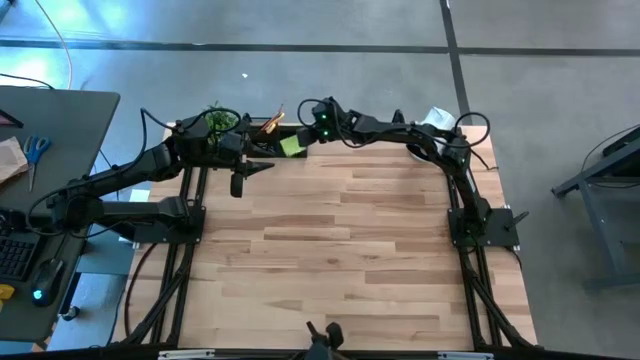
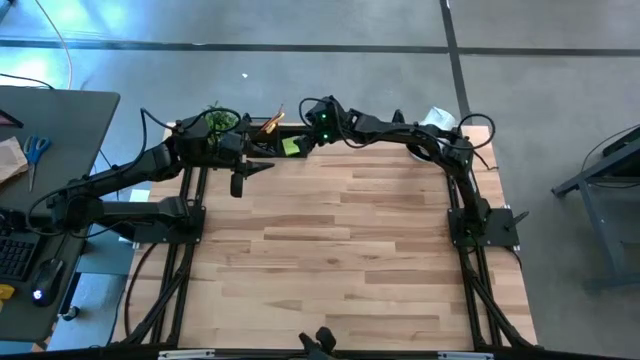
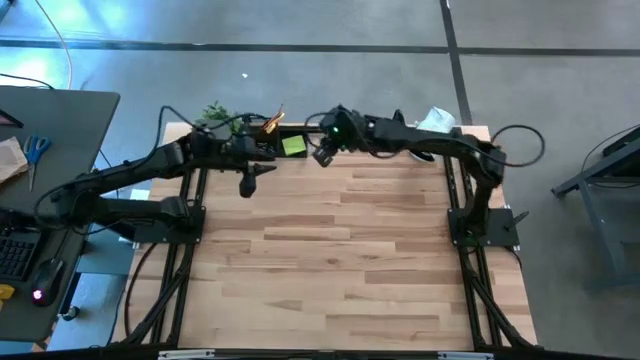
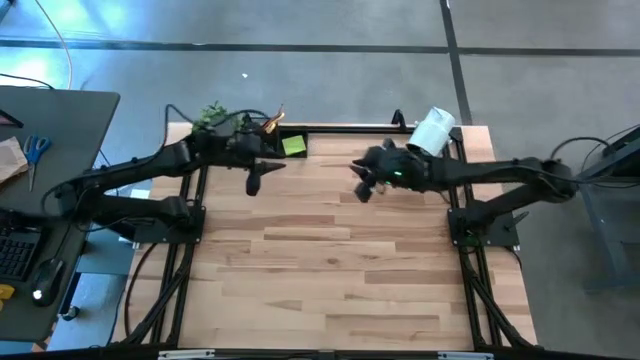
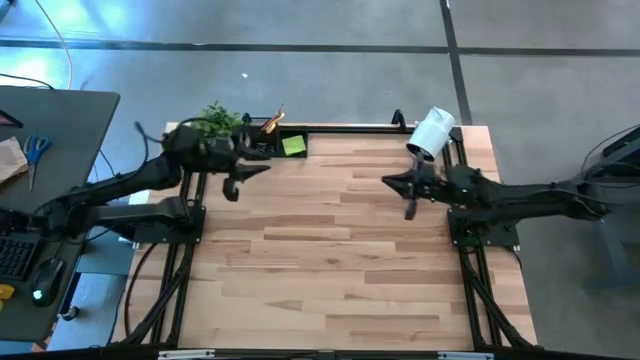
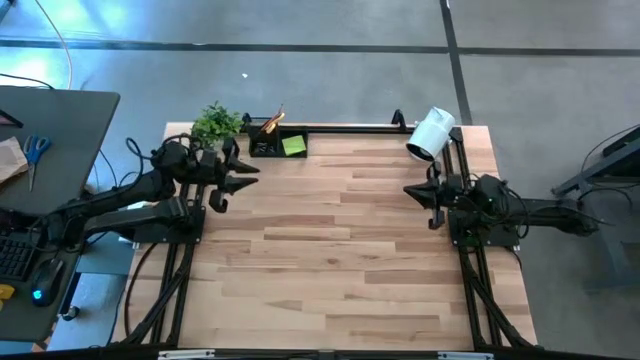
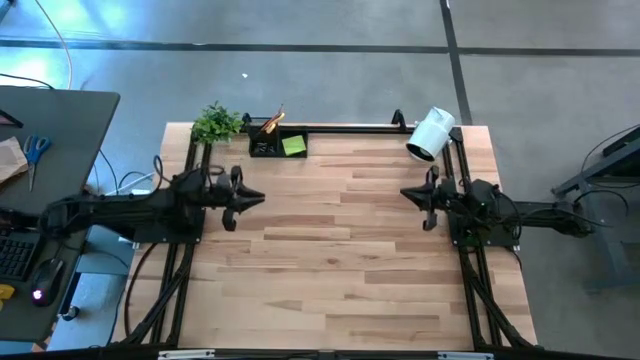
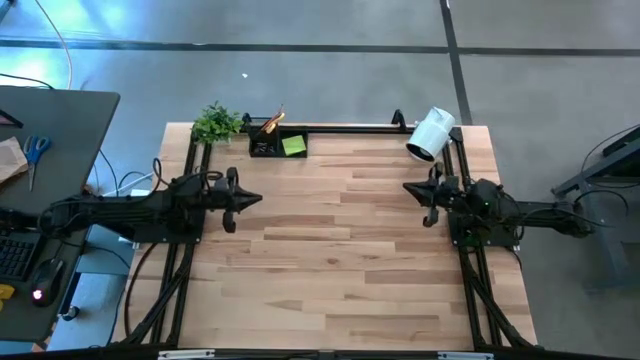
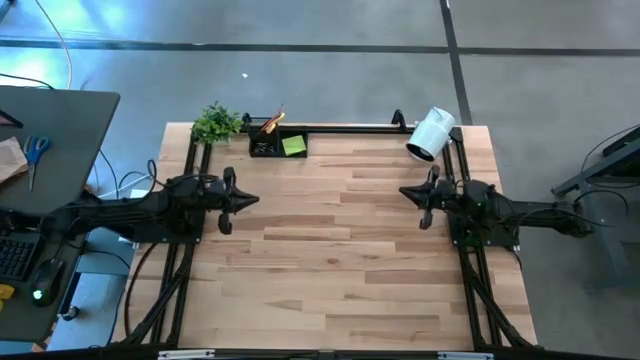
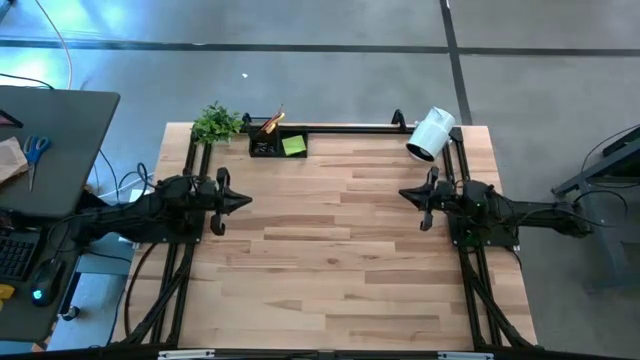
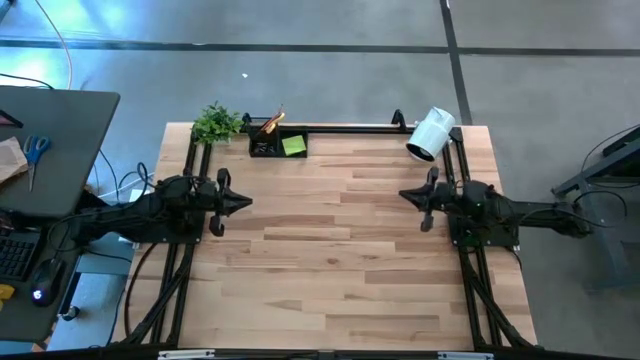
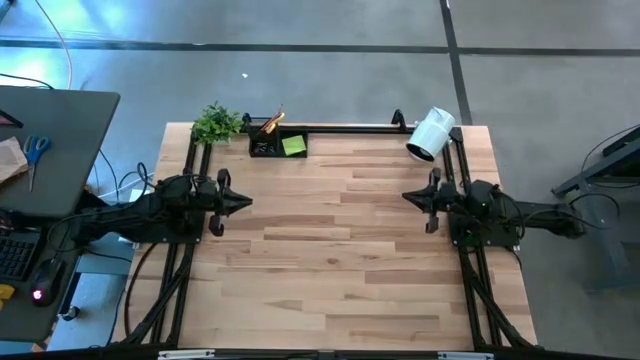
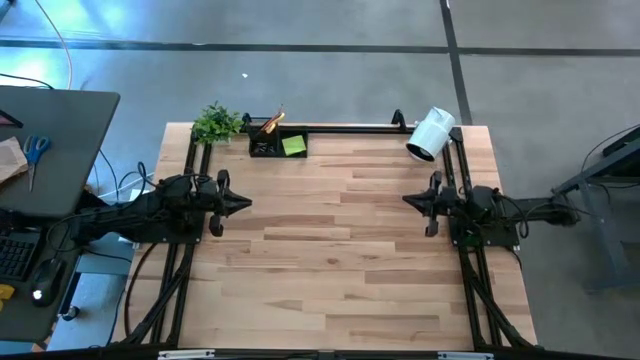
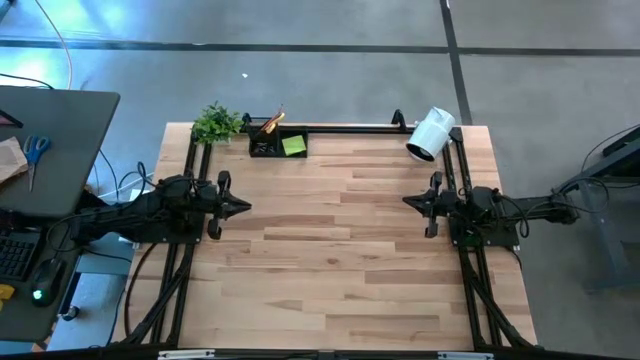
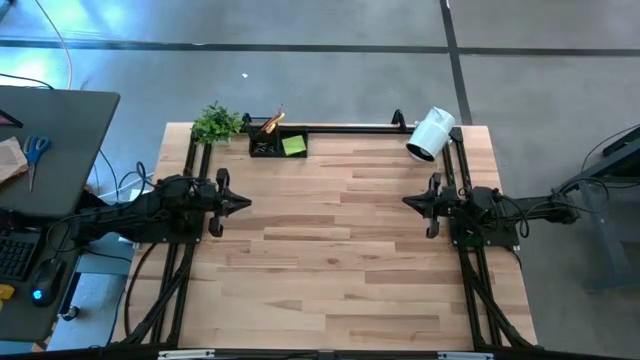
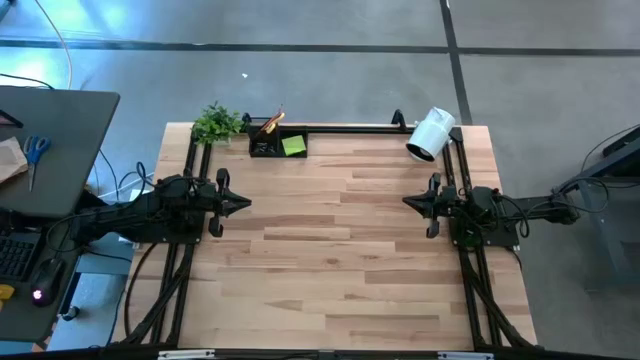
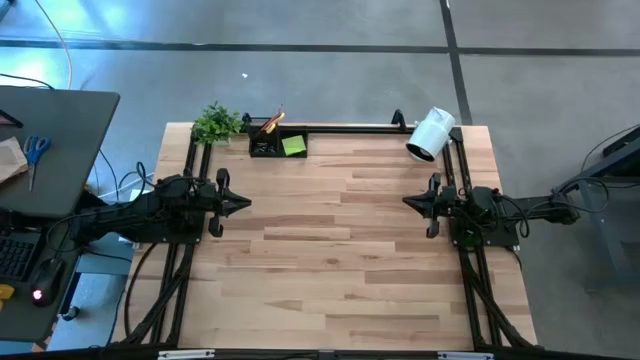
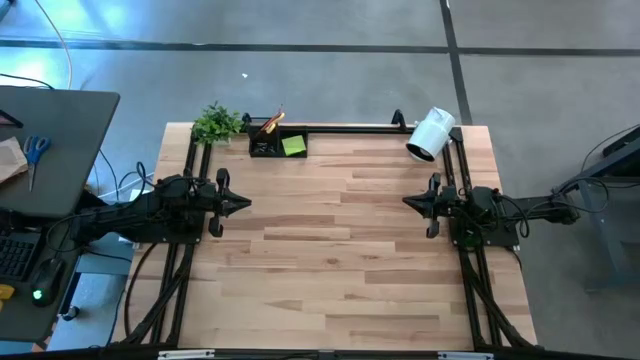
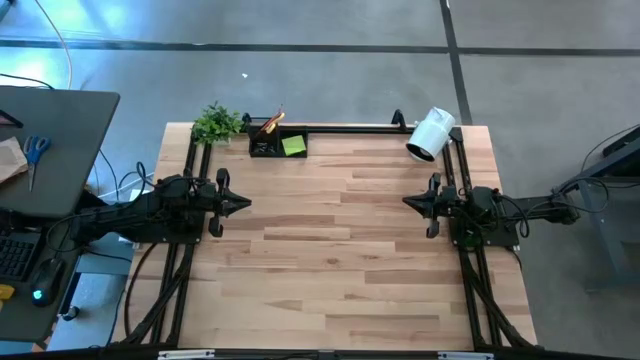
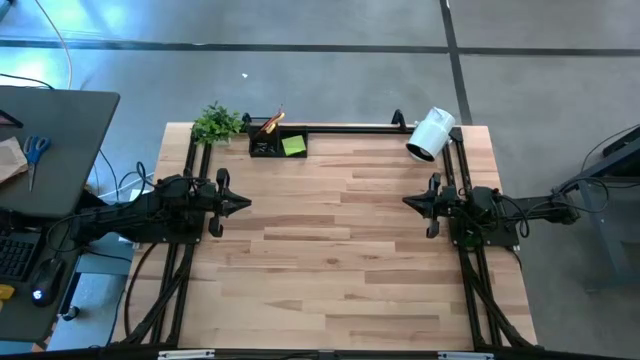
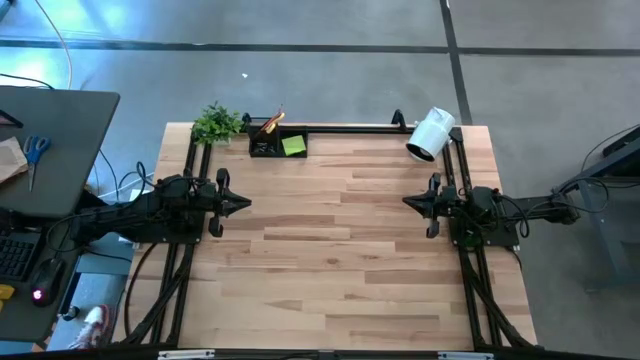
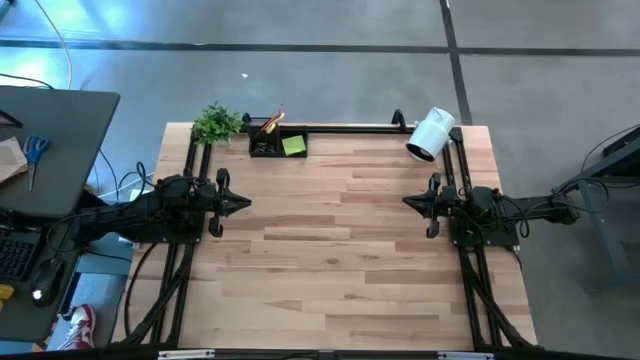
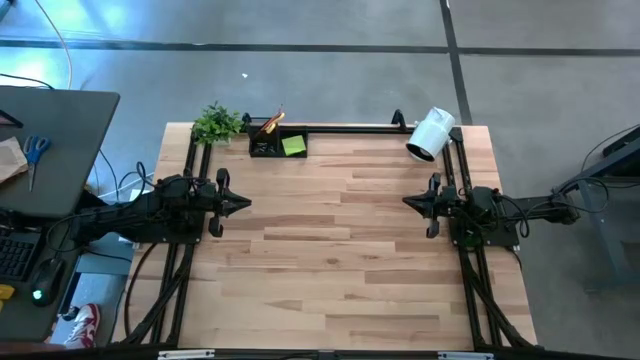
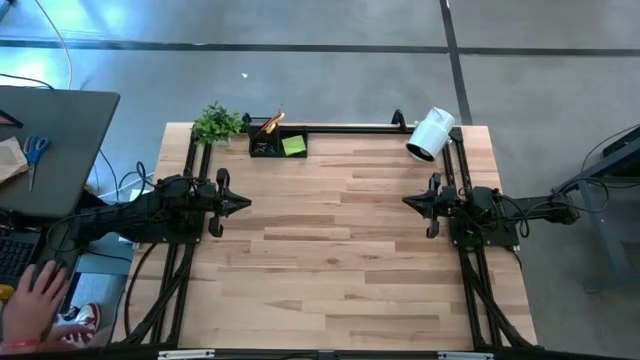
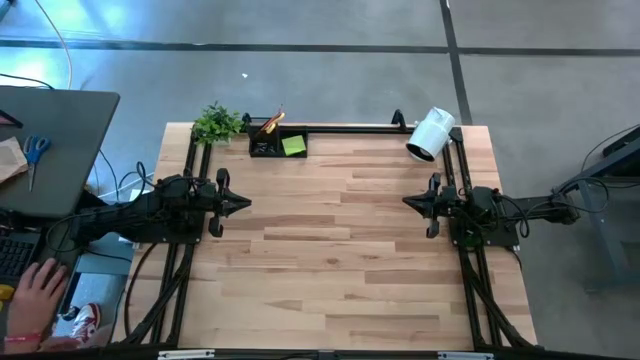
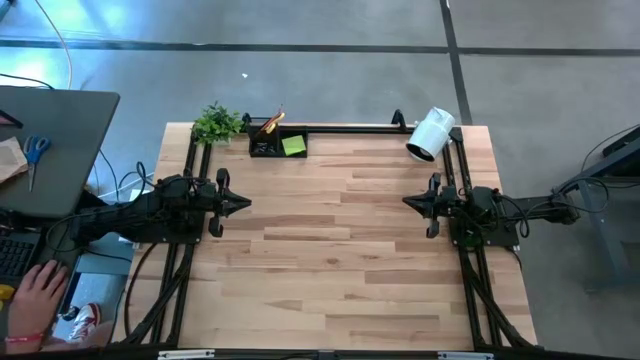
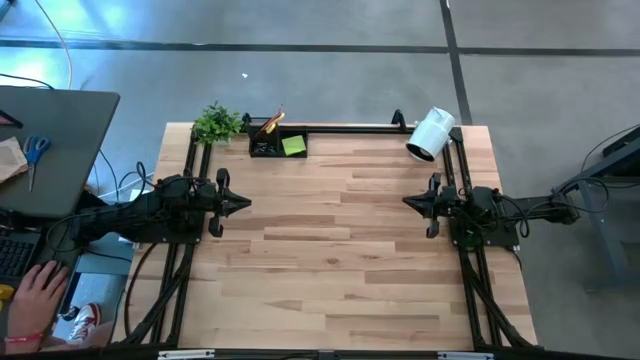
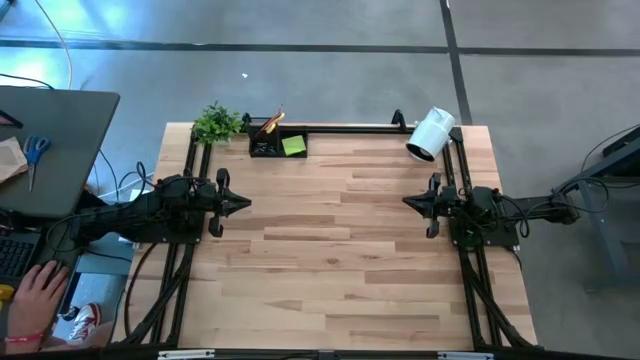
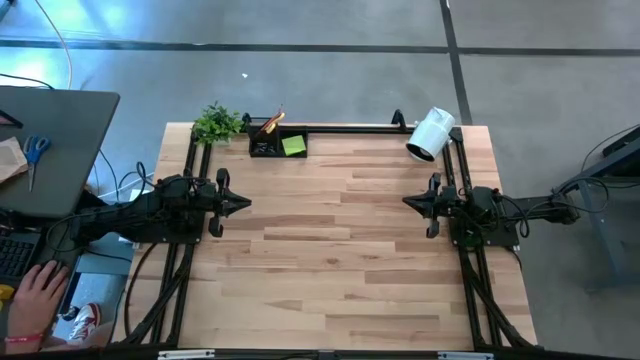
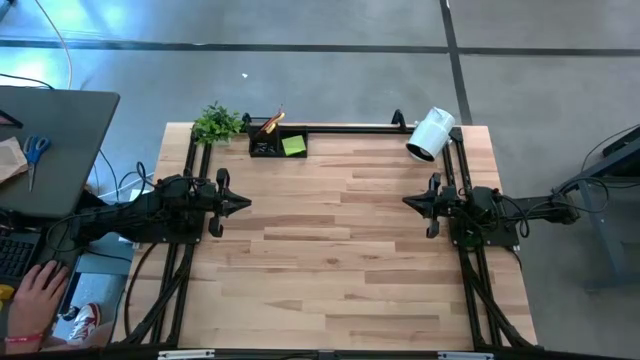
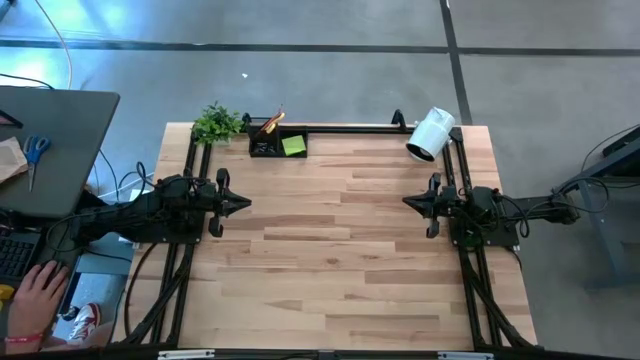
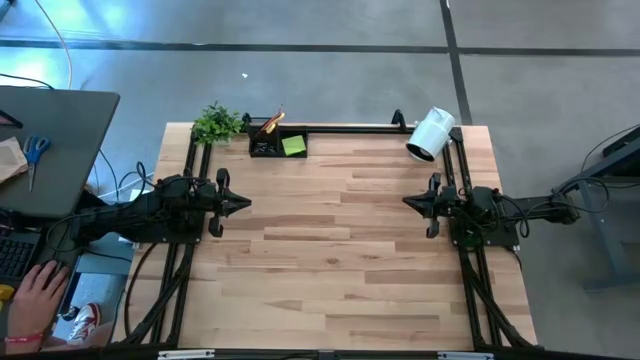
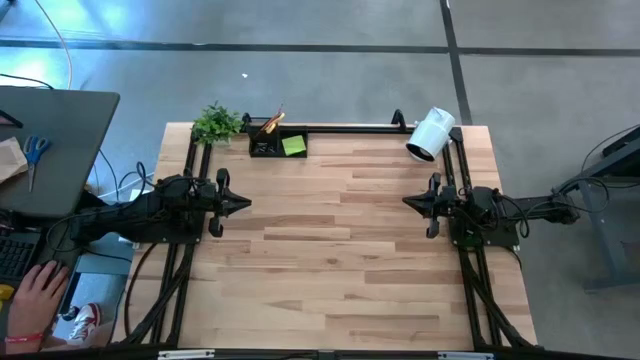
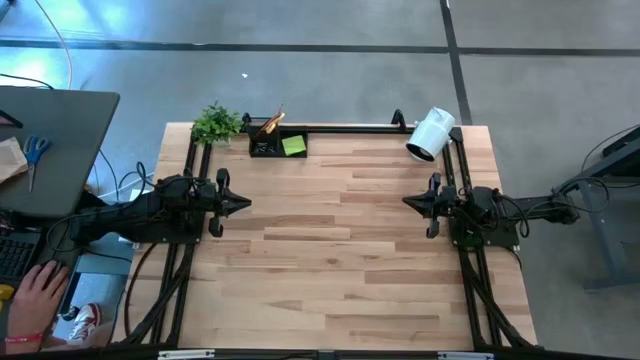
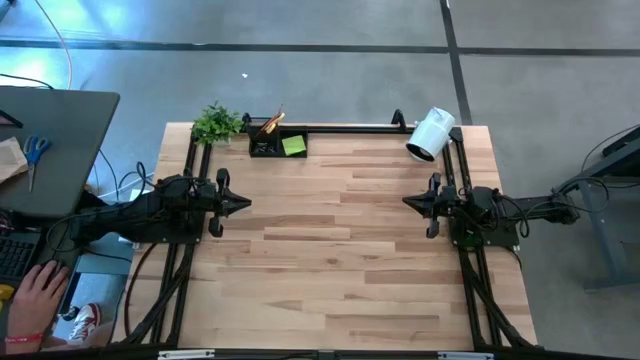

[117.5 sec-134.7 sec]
Task: Pick and place office supplies into organizer
Return to Home Position

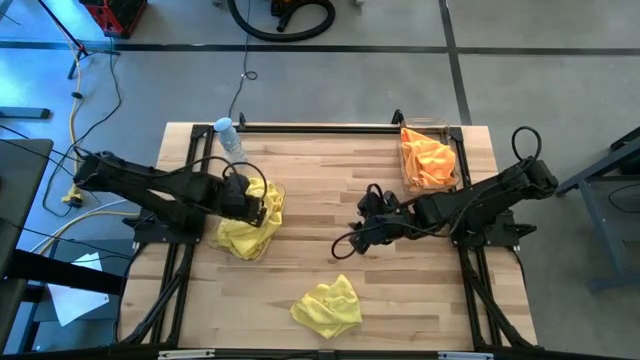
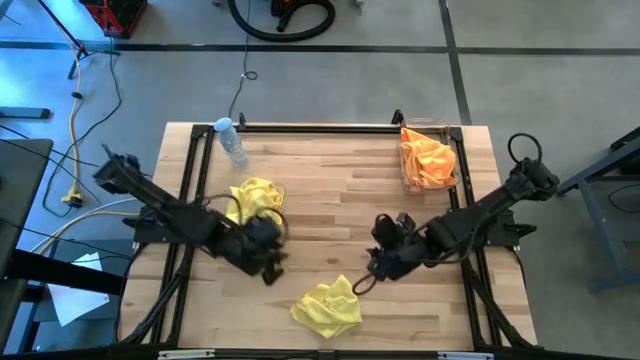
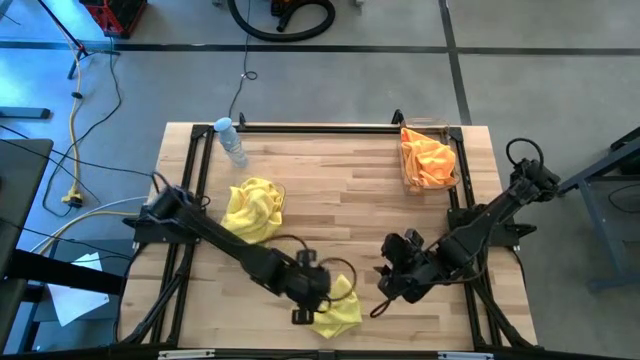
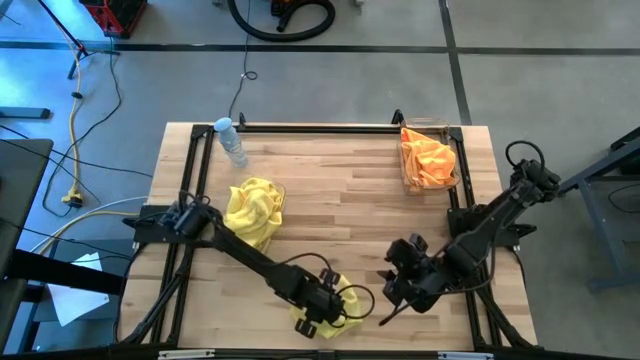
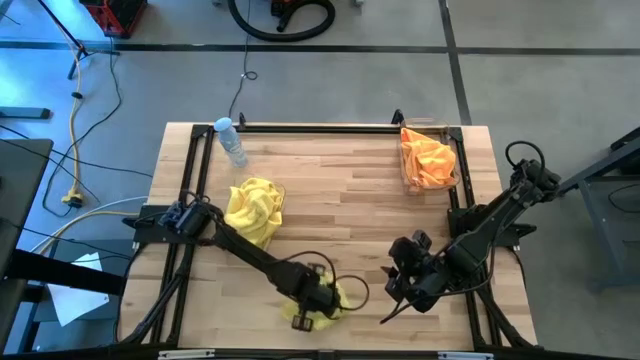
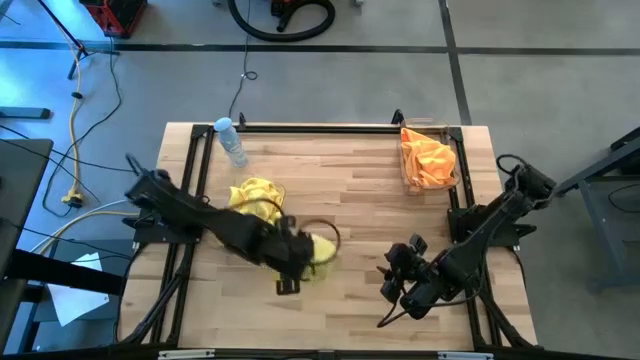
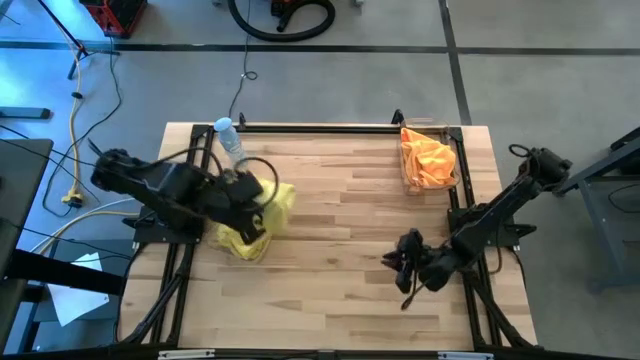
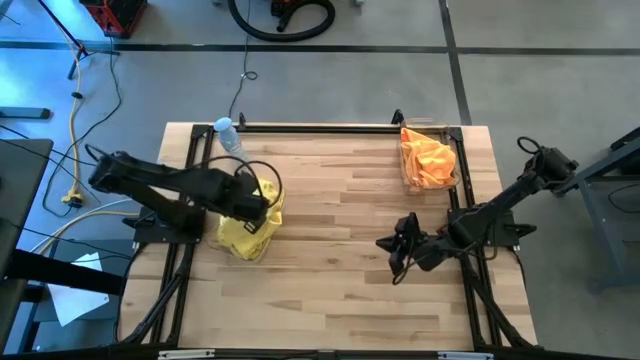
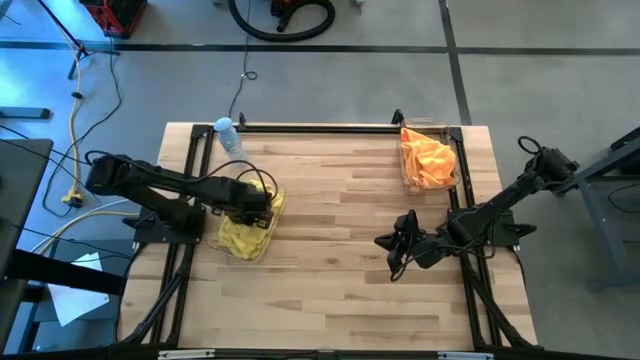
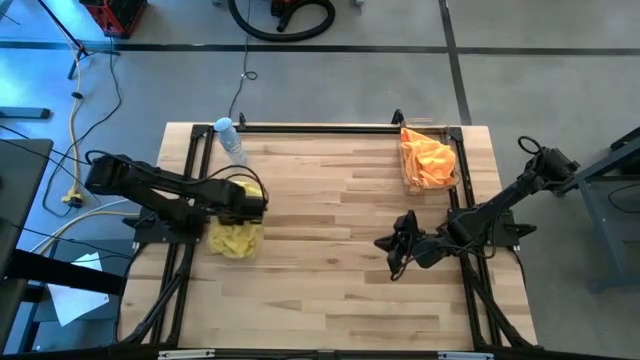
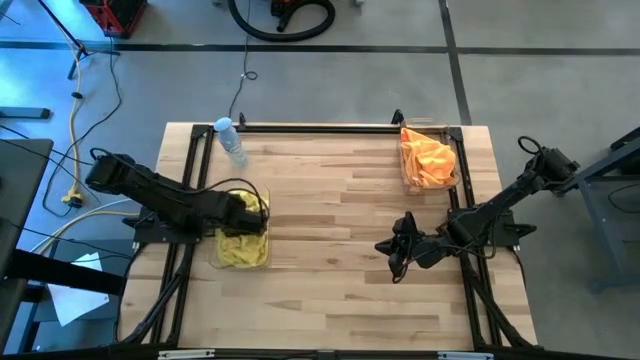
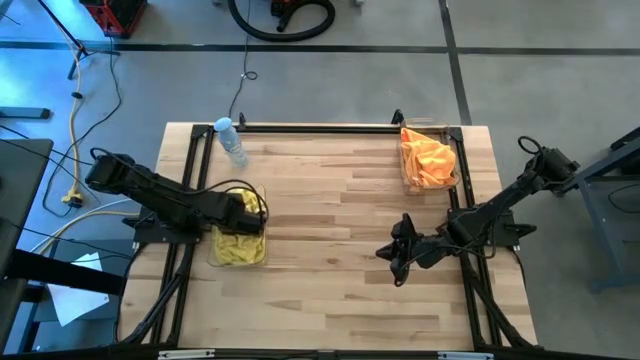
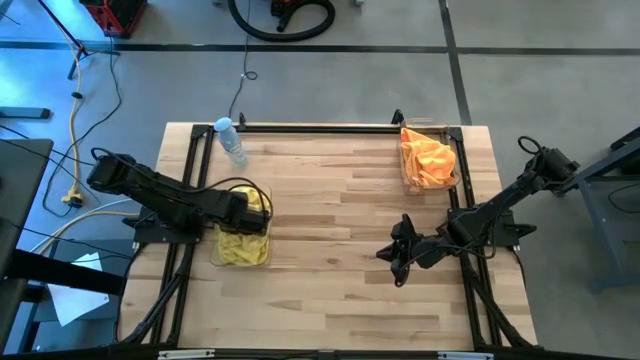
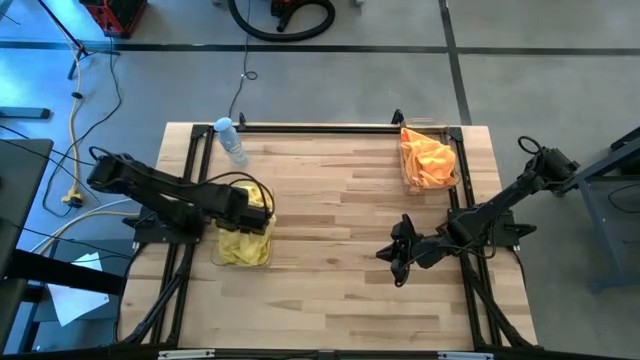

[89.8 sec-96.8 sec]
Task: Sort microfiber towel by color & place in baskets
Put the yellow microfiber cloth into the left transparent bin
